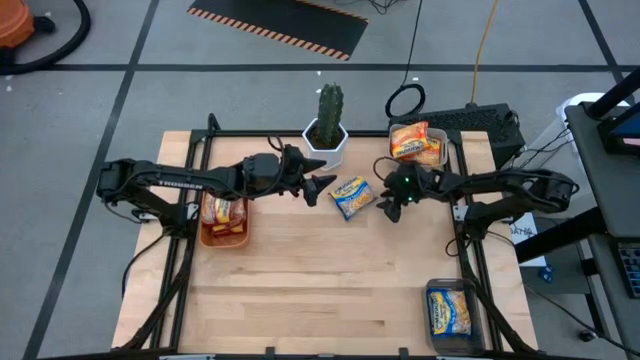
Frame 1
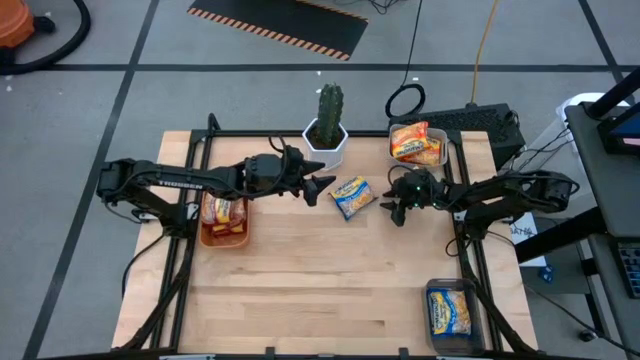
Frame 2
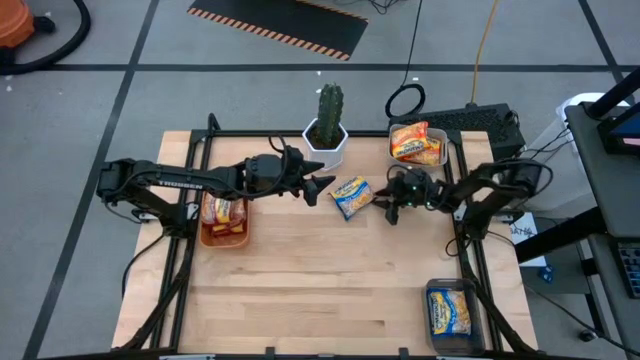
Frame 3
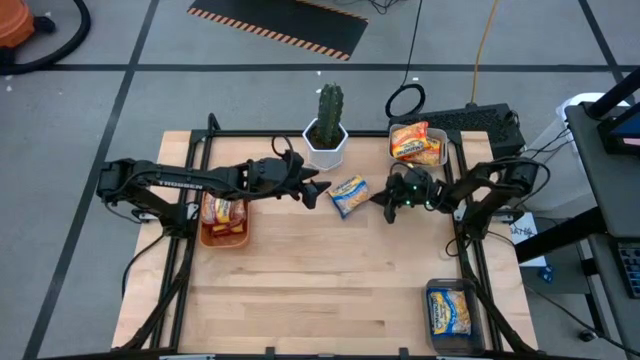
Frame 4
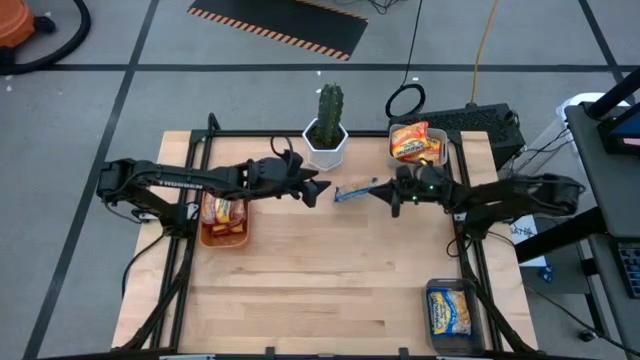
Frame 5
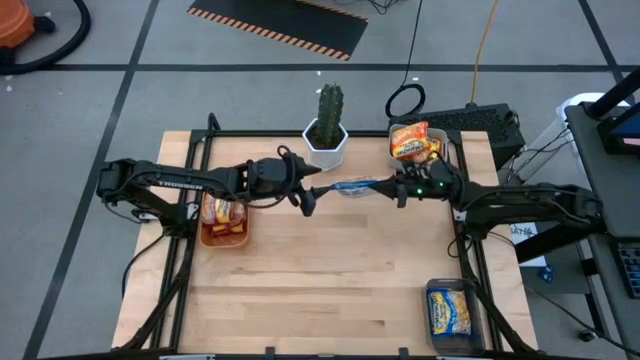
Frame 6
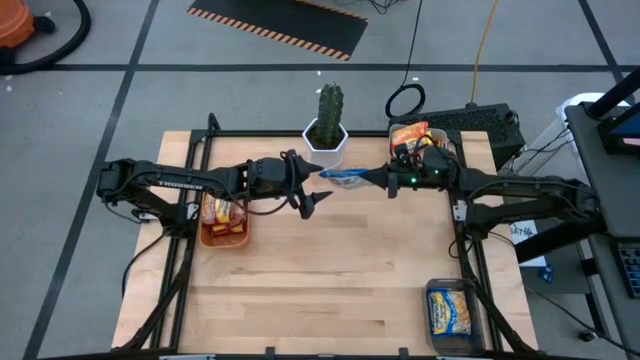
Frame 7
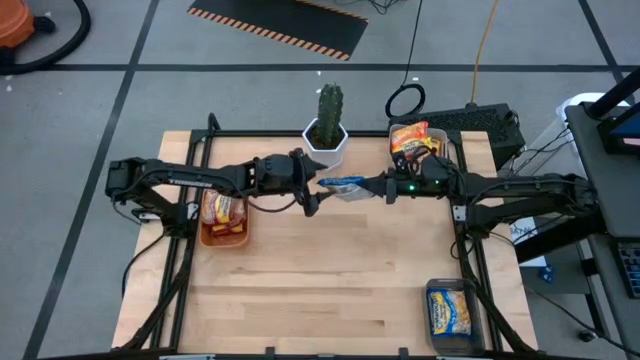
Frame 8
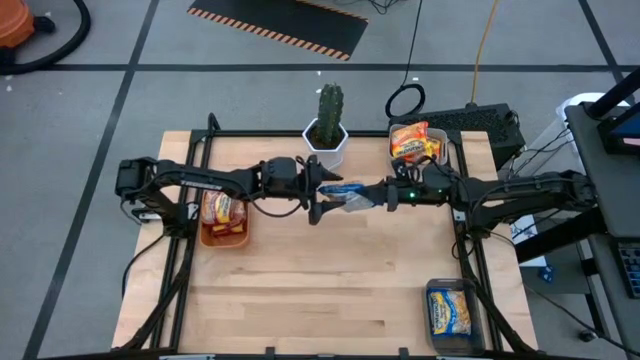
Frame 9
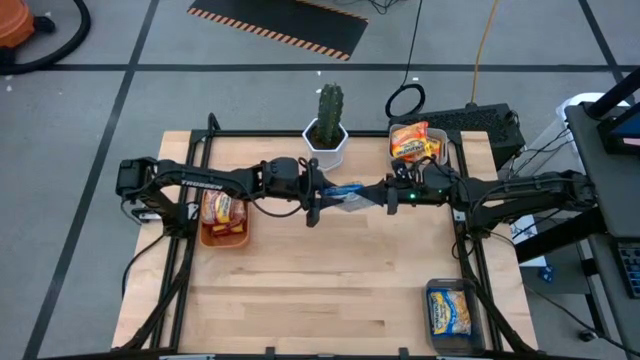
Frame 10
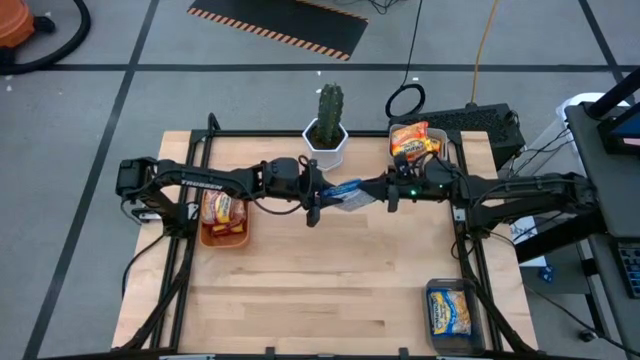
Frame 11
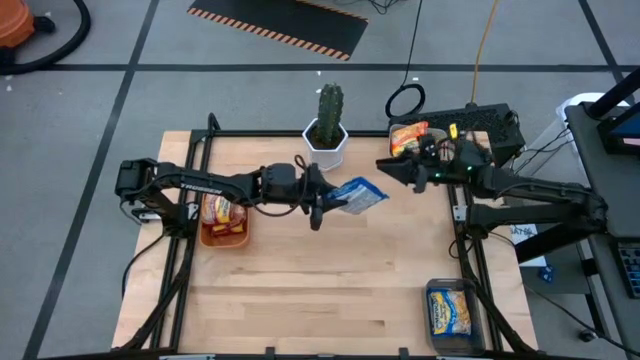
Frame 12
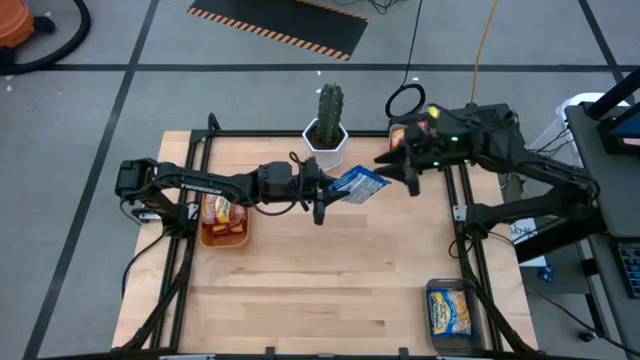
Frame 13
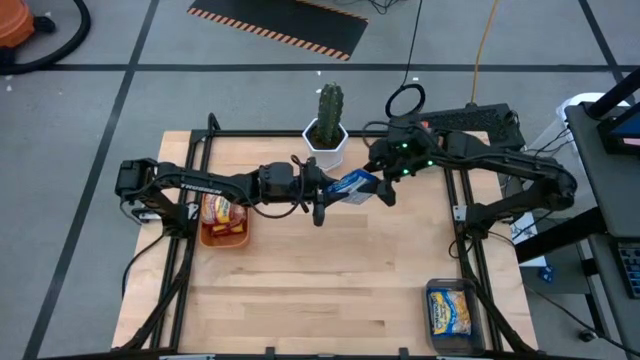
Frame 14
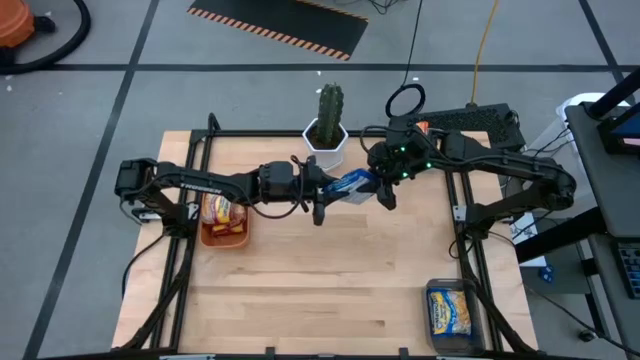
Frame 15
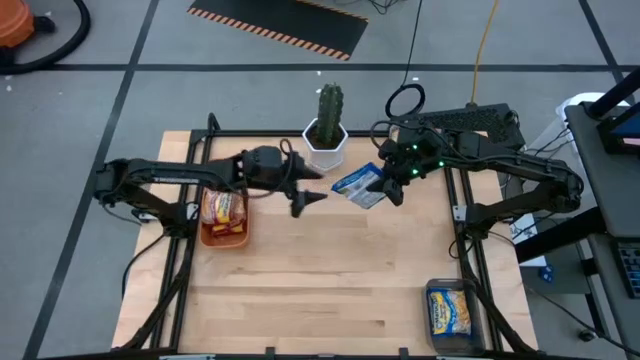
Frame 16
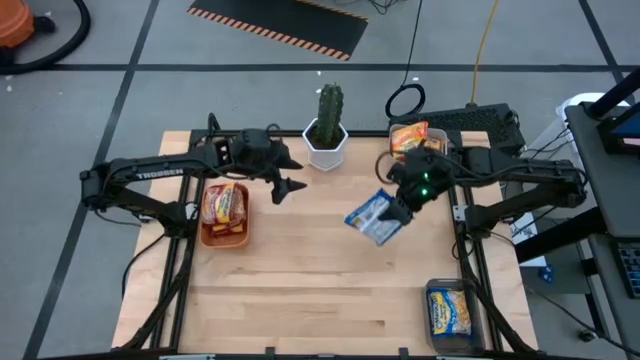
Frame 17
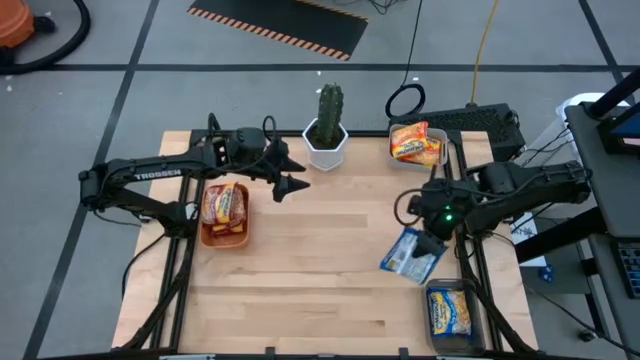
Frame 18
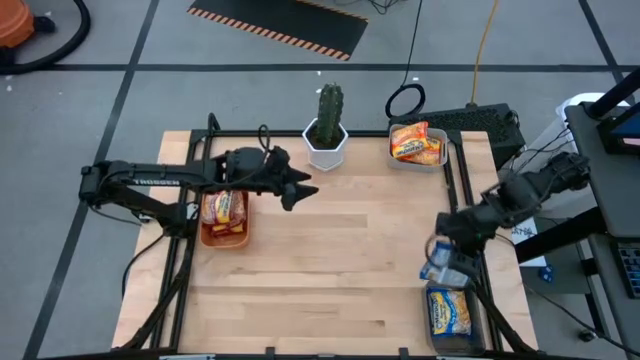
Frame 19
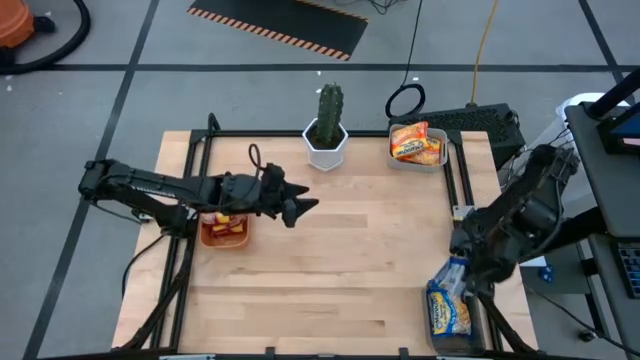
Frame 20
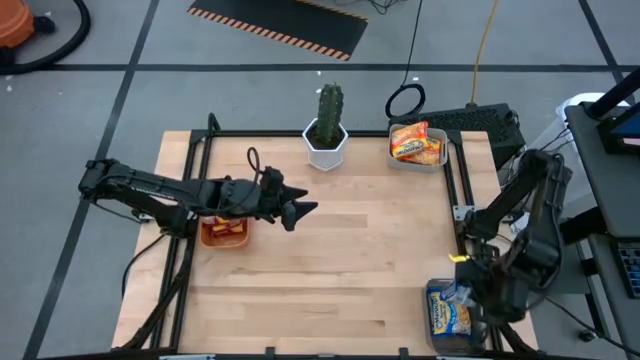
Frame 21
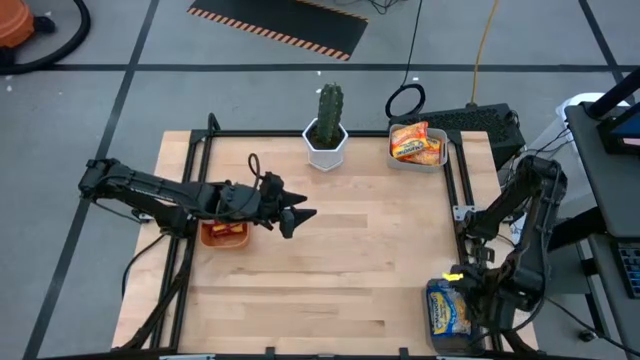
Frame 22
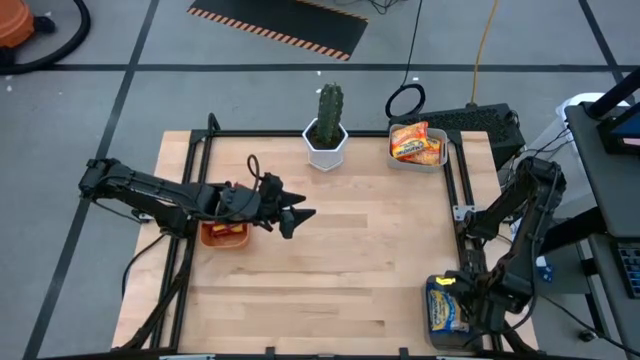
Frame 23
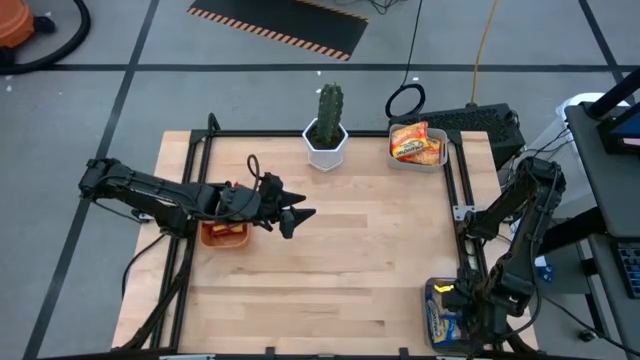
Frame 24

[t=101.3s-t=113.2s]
Task: Sort Maruchan noodles
Put the blue noodle pack into the black bin

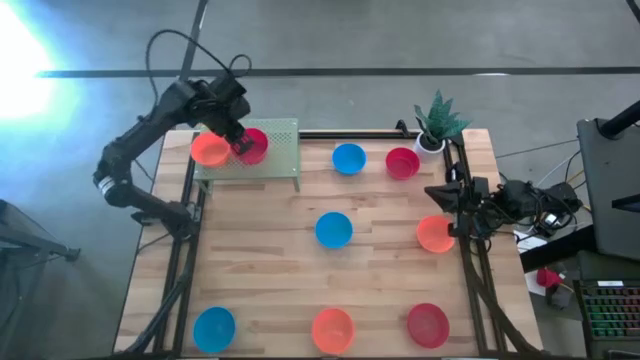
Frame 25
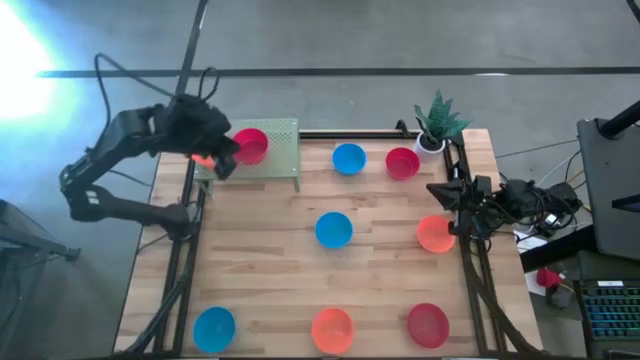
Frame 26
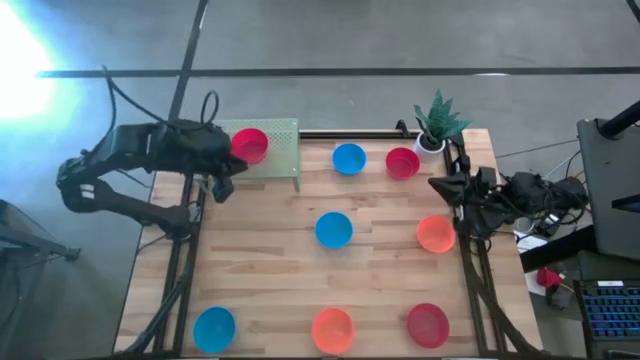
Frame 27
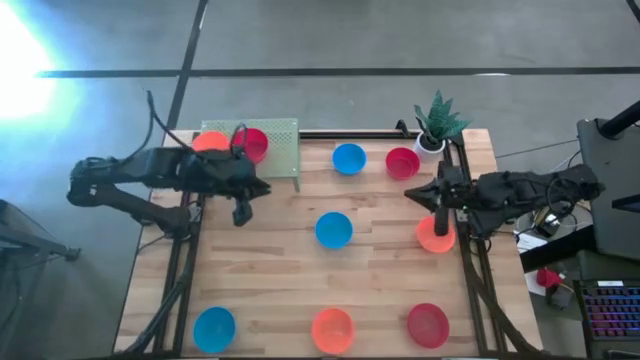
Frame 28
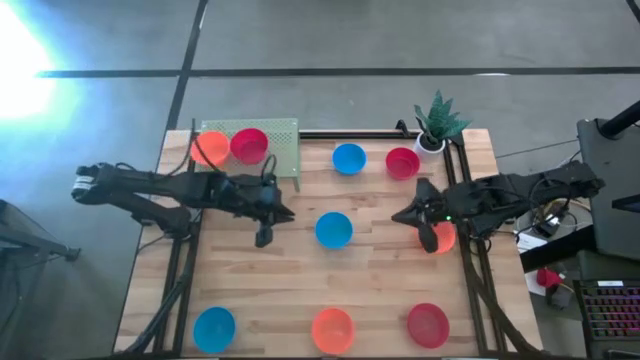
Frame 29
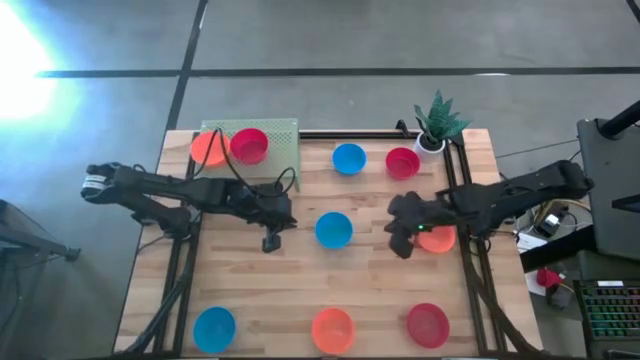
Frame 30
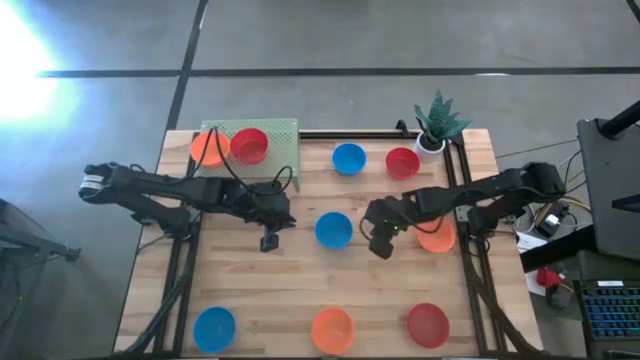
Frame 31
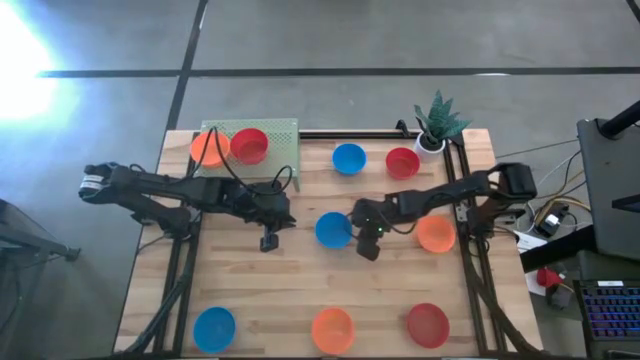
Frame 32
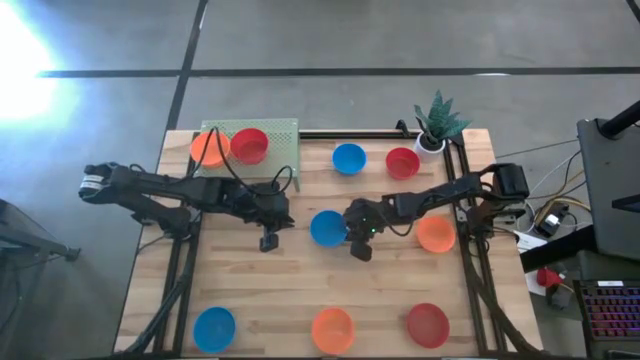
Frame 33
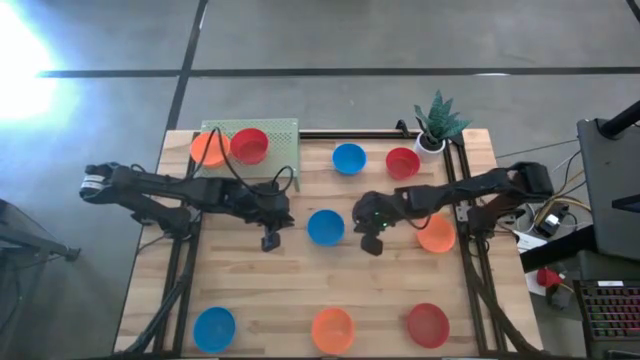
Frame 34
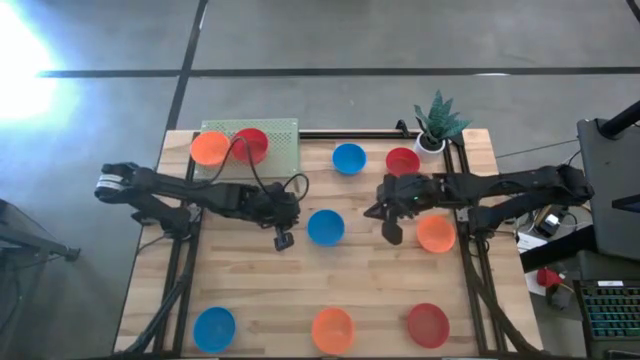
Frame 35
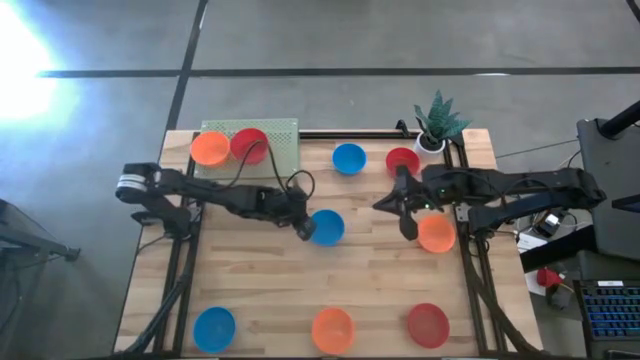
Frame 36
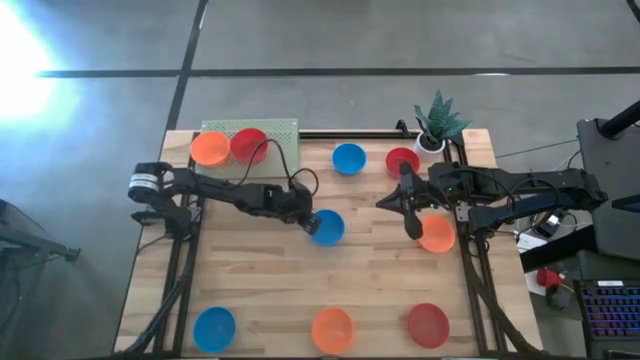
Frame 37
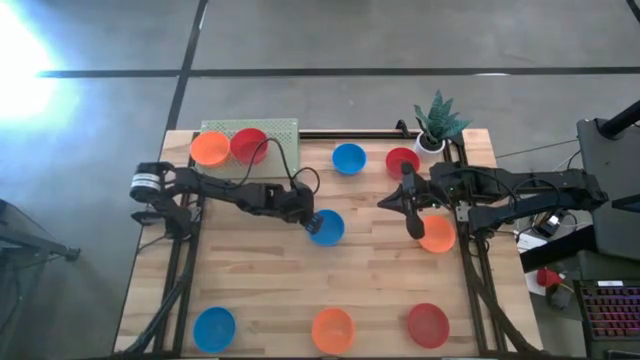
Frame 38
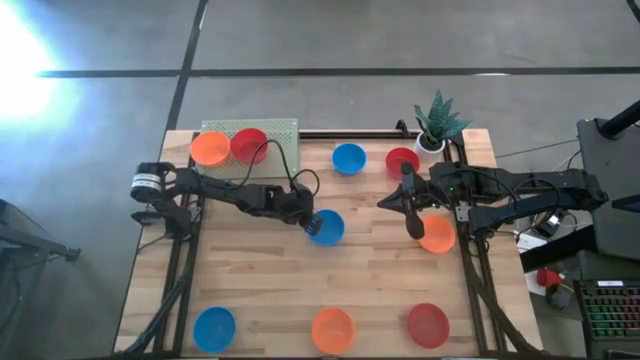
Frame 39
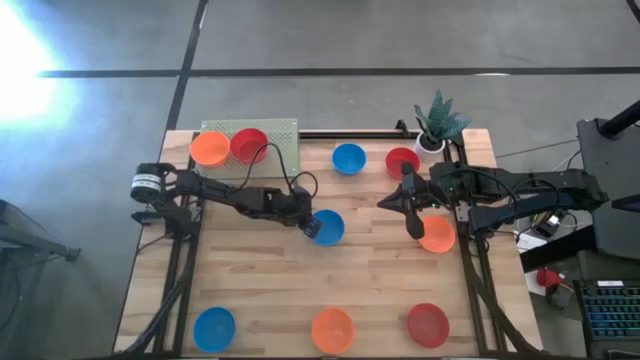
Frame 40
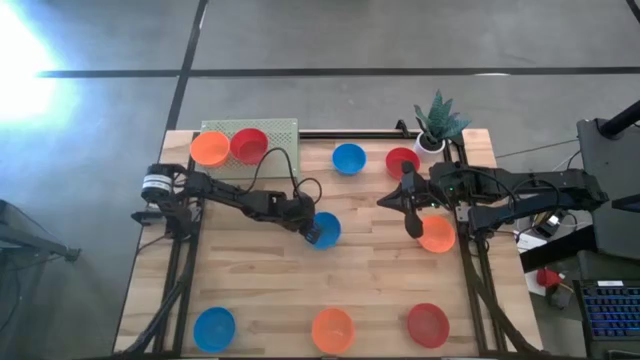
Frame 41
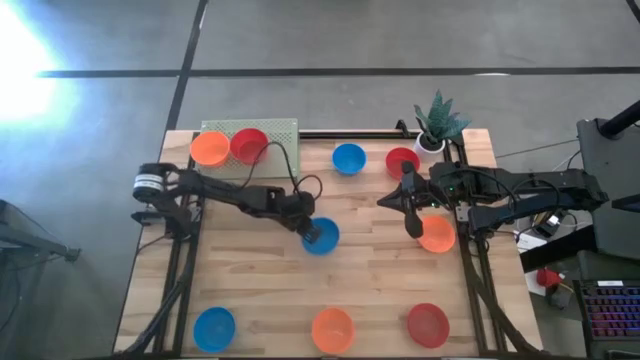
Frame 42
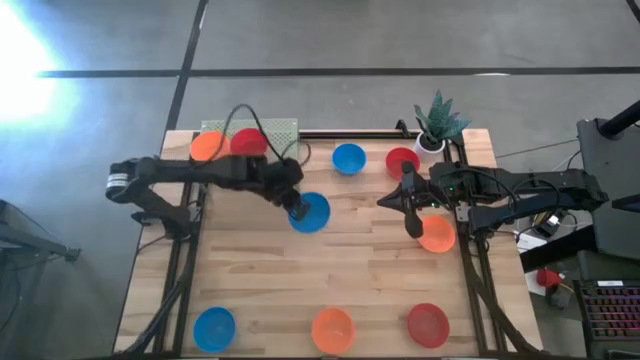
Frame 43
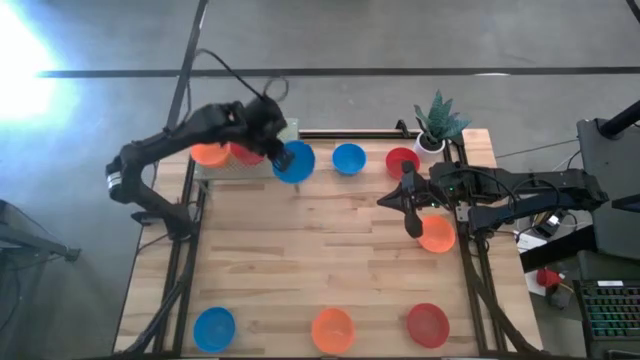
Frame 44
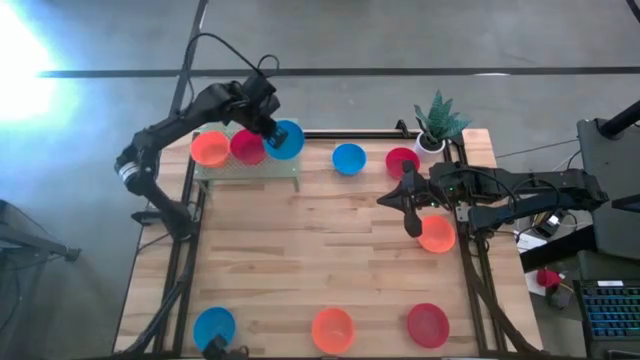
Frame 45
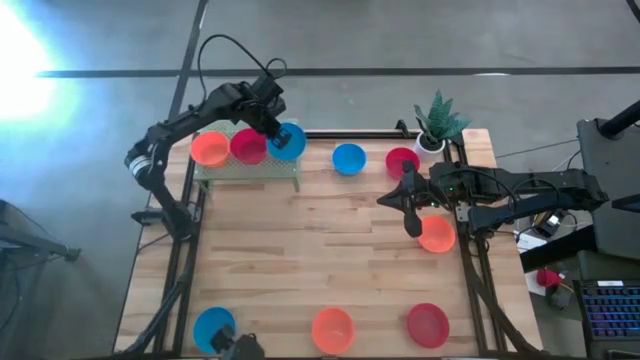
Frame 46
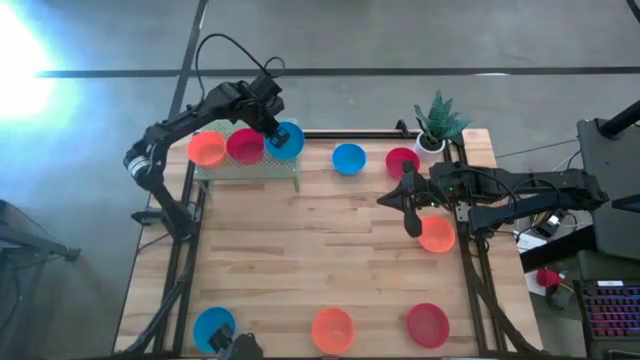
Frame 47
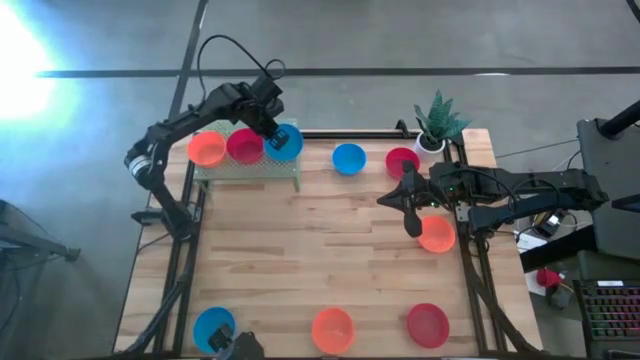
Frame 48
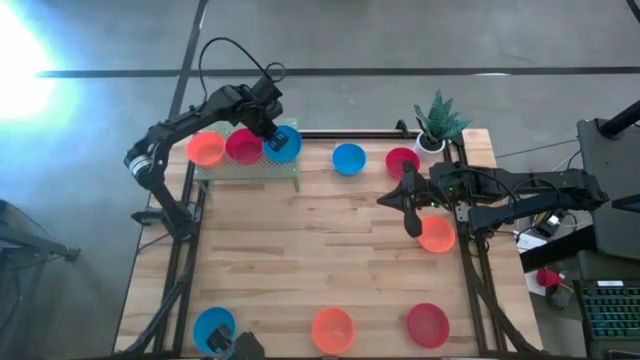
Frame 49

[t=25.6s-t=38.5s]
Task: Pick & Place Mini bowls
Put the middle blue bowl on the shelf
